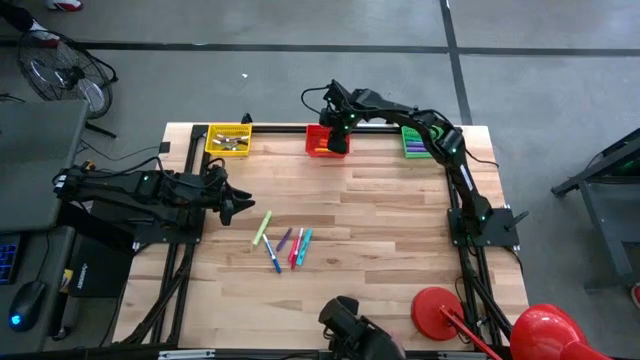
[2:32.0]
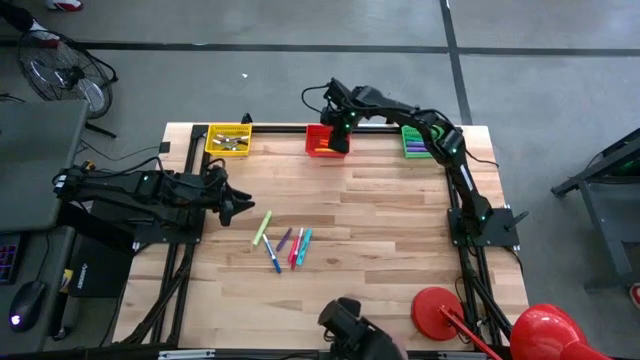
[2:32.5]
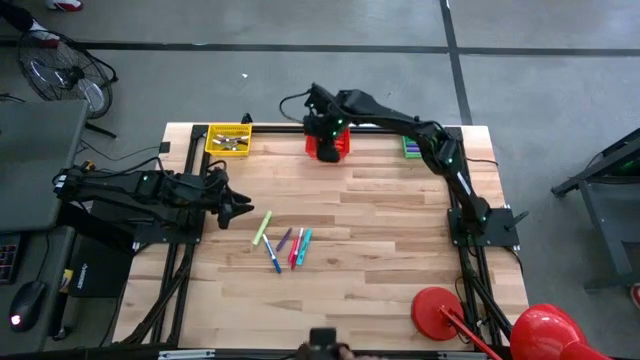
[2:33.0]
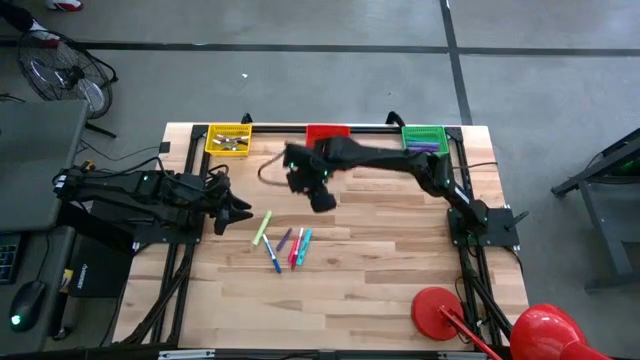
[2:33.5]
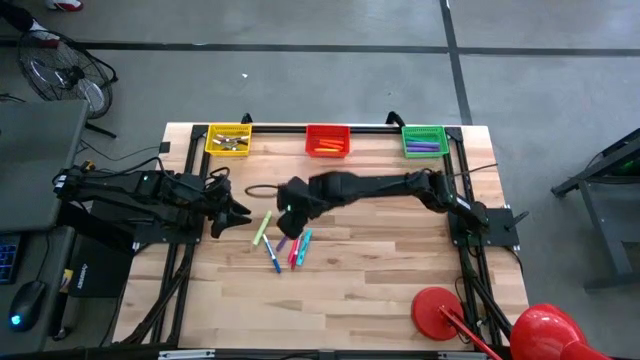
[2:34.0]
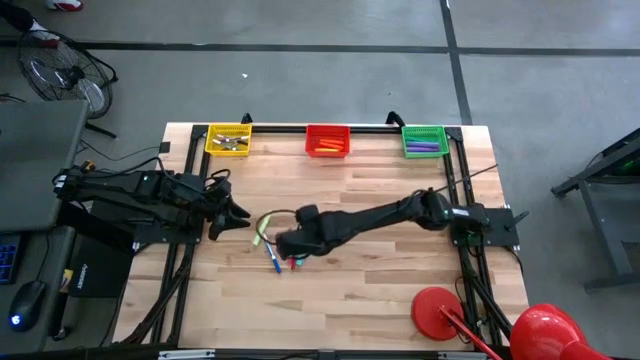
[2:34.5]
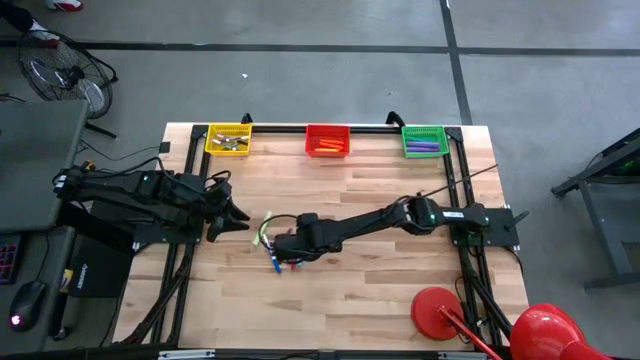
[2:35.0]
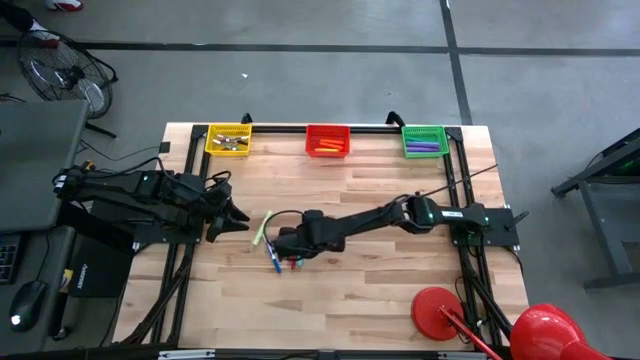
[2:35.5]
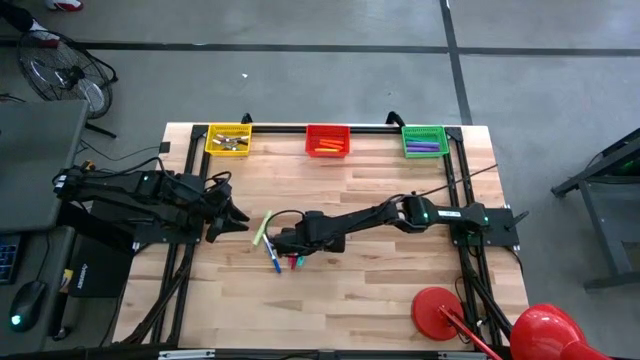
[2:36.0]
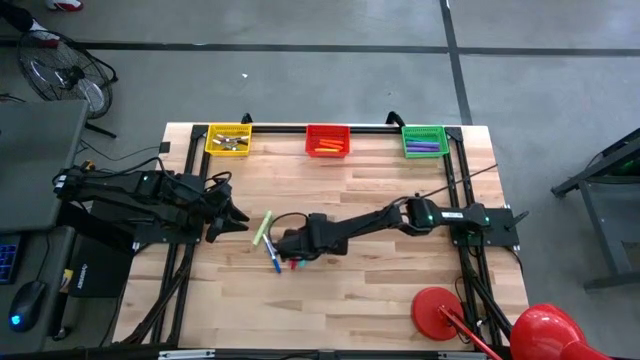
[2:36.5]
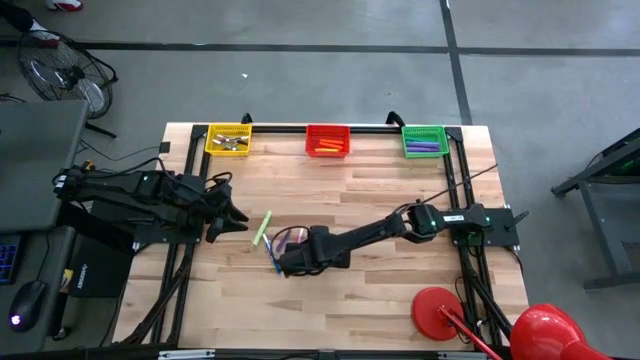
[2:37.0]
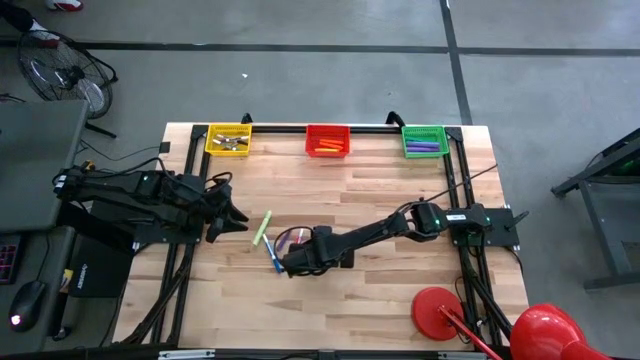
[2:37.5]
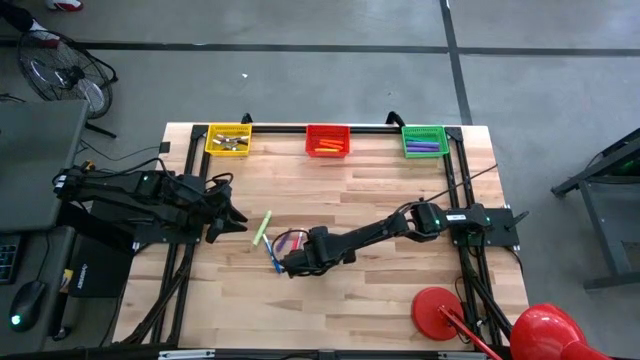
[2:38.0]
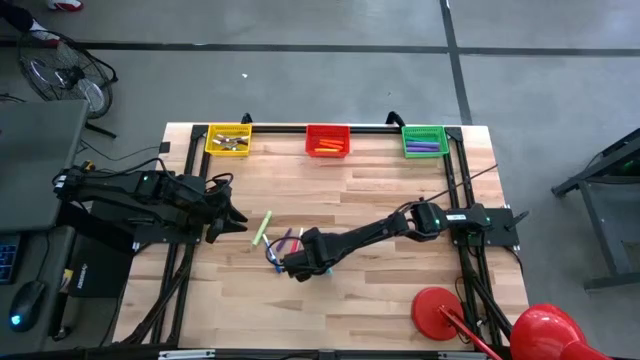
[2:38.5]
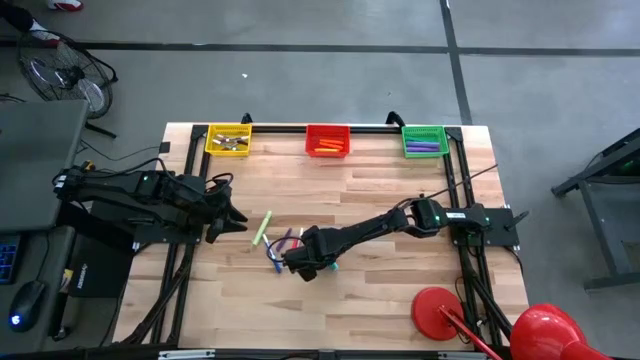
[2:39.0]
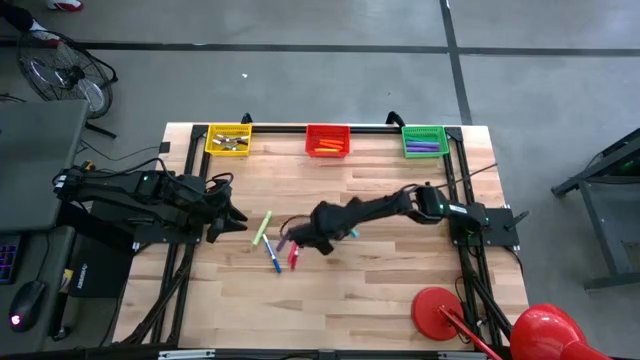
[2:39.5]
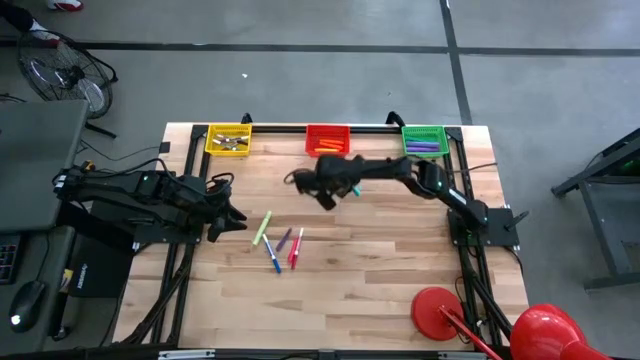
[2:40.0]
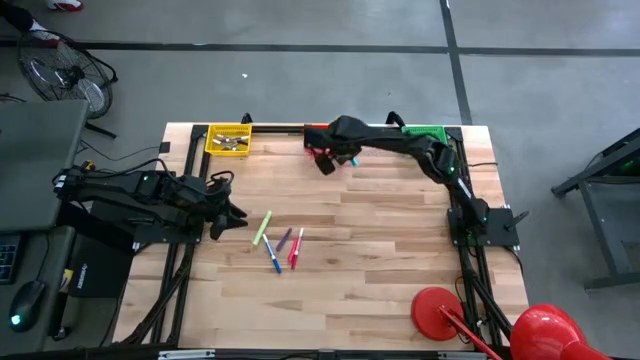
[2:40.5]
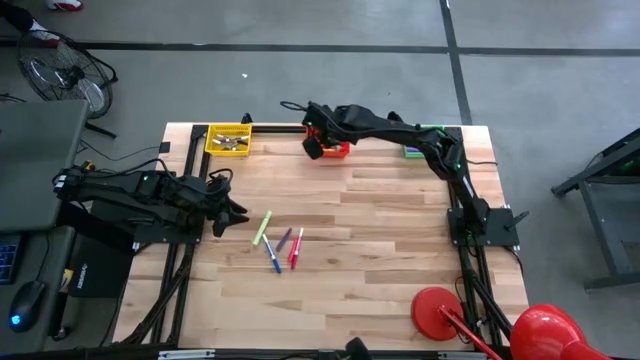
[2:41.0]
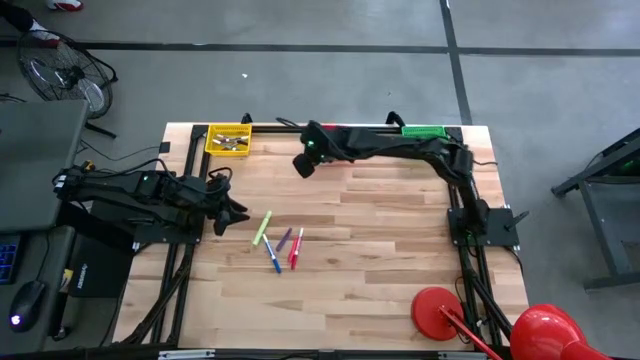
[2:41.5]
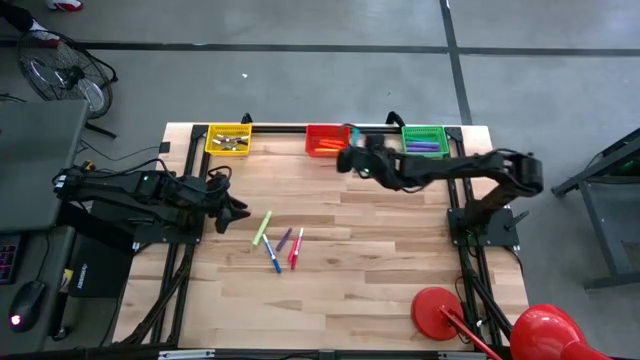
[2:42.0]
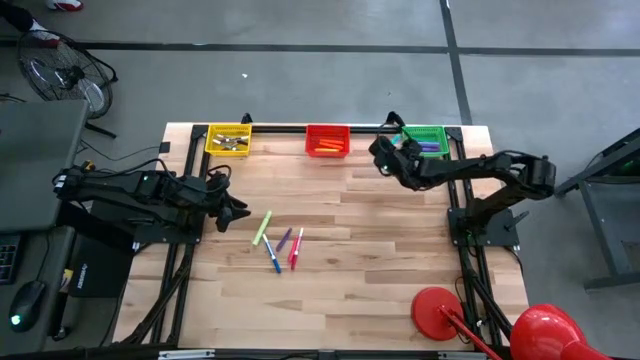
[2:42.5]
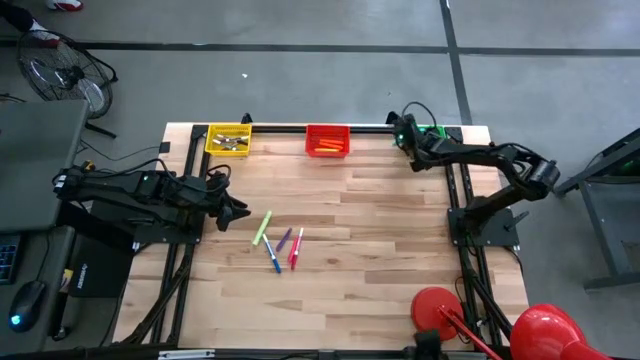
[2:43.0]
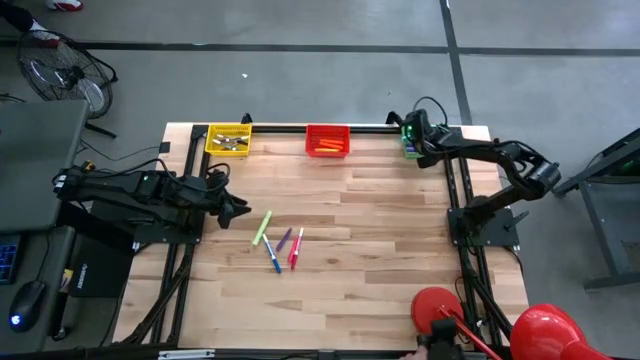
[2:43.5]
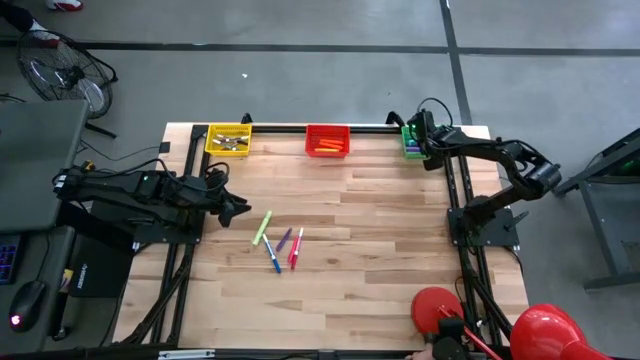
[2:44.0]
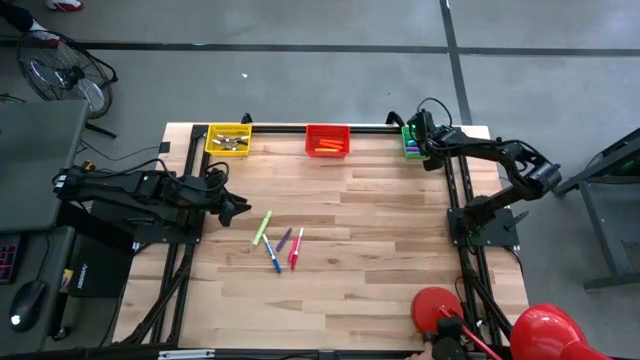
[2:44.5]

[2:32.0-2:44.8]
Task: Pick & Place Markers
Put the blue highlighter into the green bin

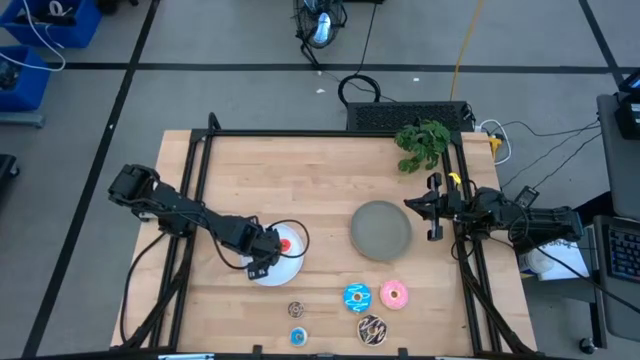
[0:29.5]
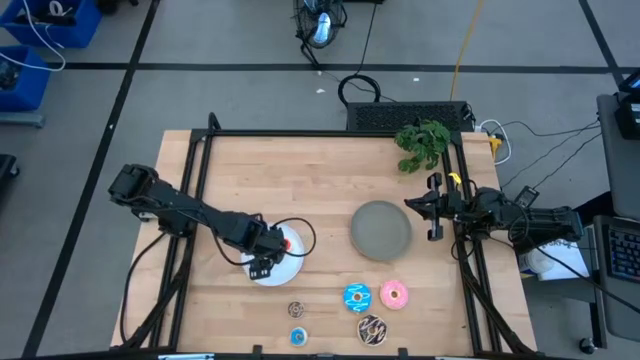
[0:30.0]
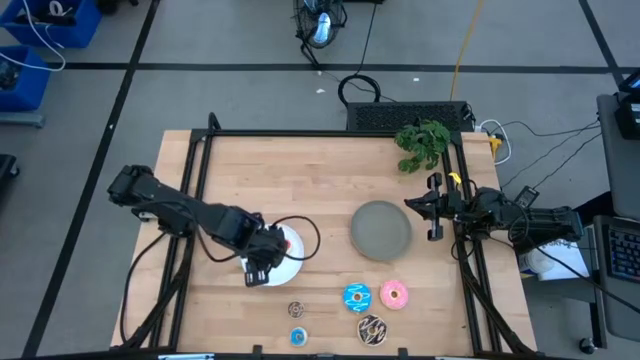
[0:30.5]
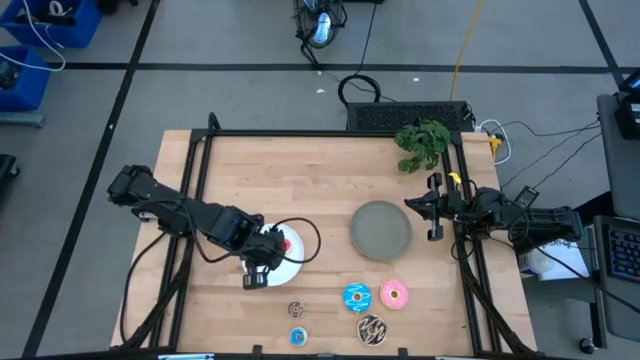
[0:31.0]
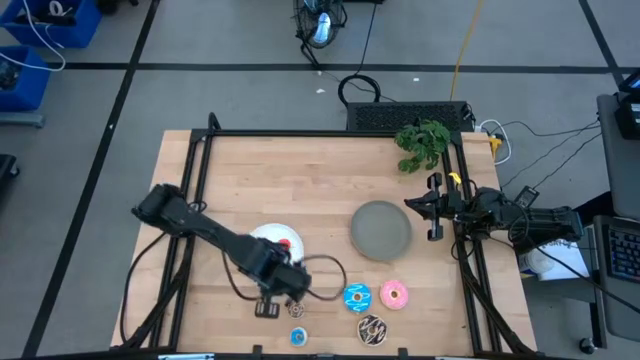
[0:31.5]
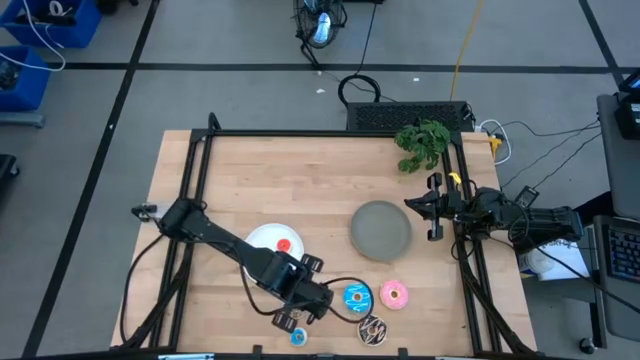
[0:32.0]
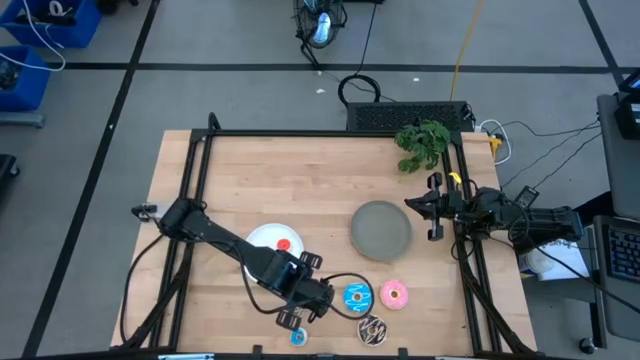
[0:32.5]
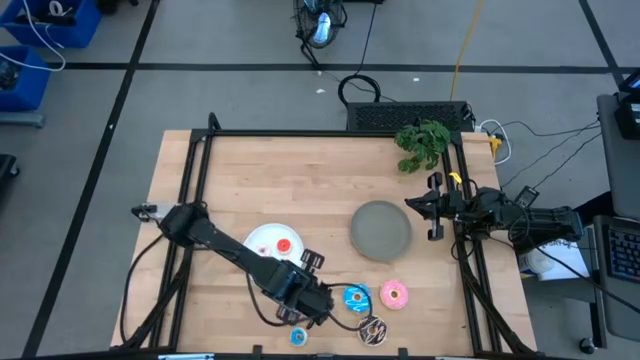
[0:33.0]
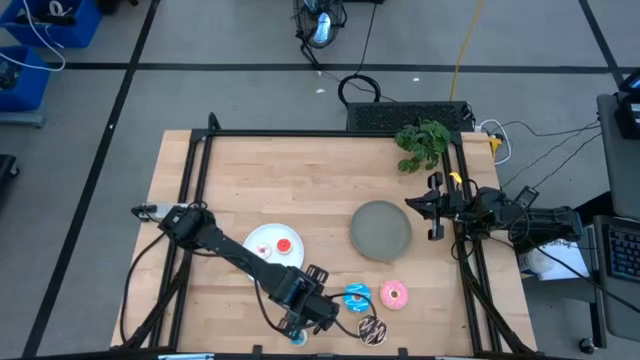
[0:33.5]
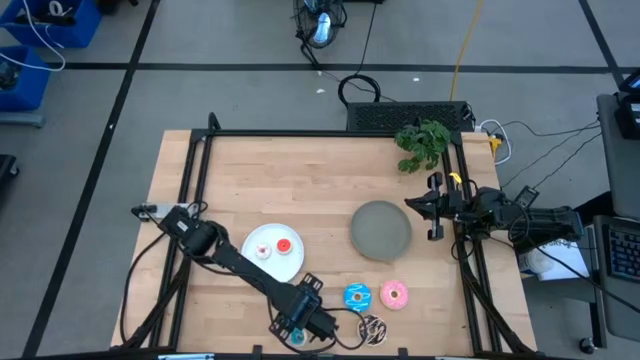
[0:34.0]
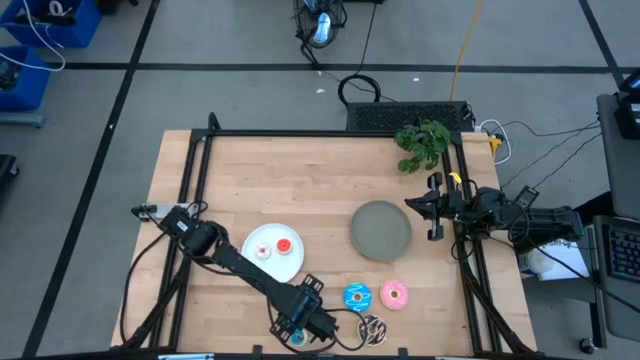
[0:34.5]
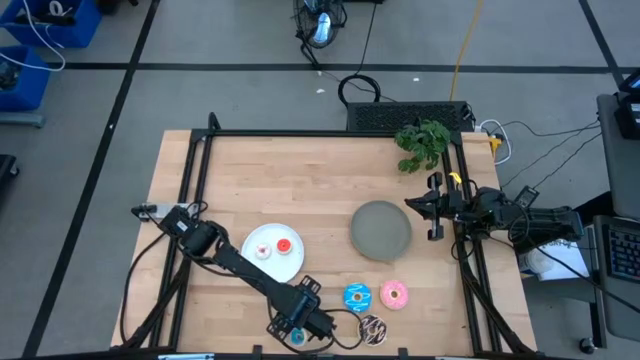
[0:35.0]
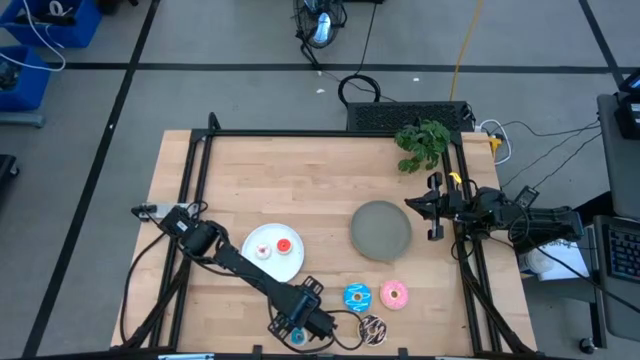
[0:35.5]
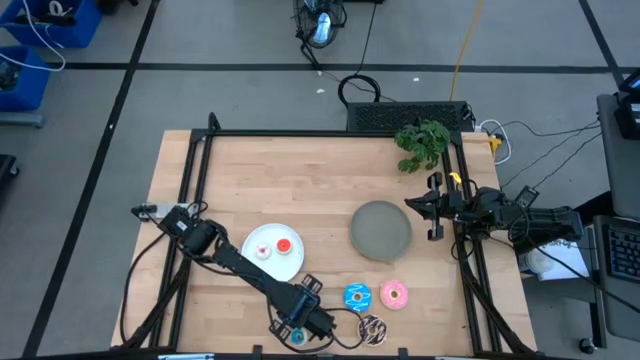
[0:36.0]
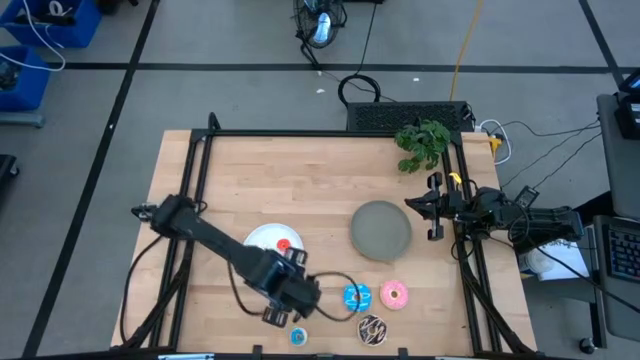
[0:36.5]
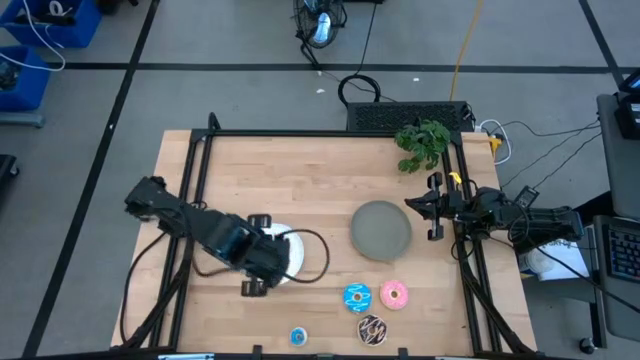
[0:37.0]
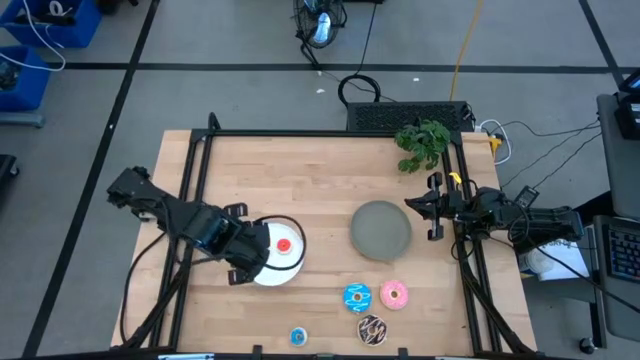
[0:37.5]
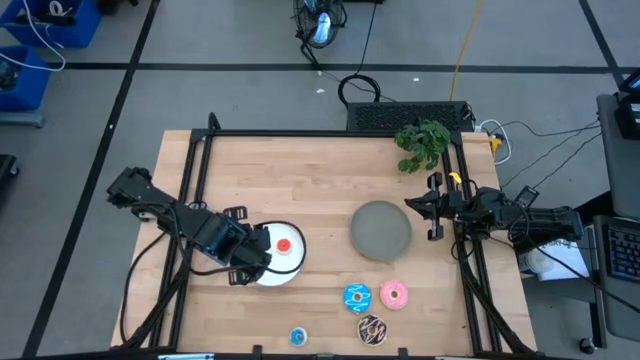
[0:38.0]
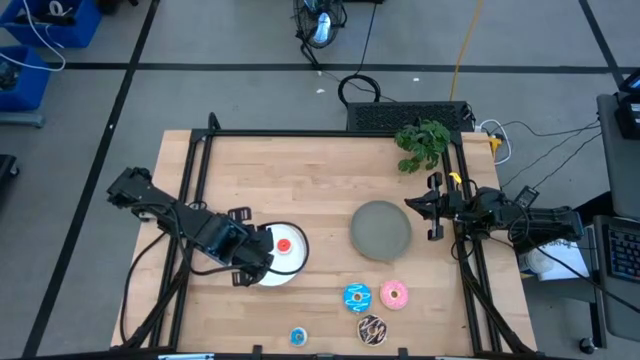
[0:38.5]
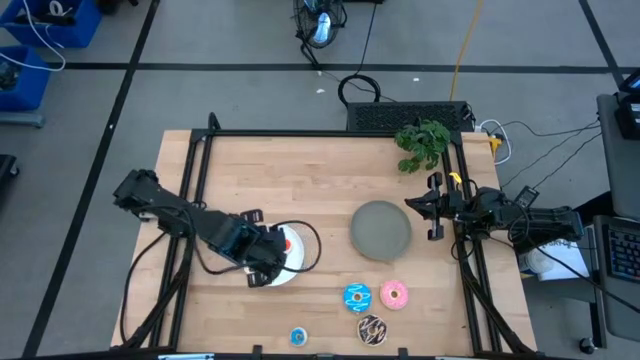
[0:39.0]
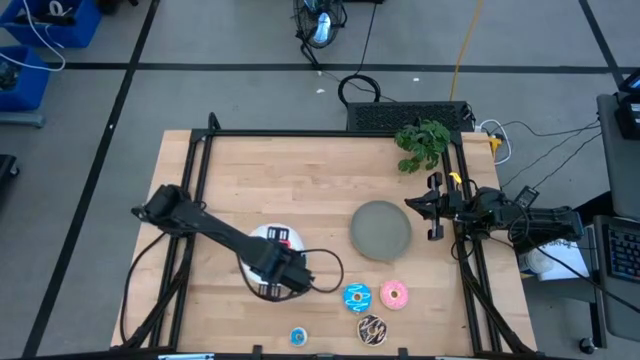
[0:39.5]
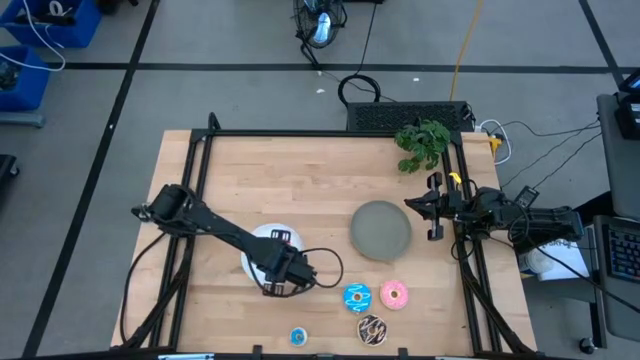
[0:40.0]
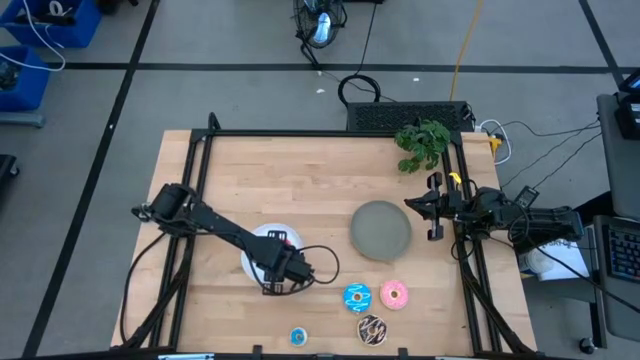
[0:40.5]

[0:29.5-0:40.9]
Task: Pick & Place donuts
Put the small brown donut on the white plate
